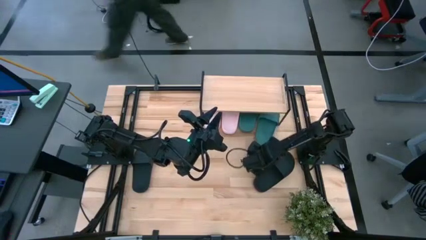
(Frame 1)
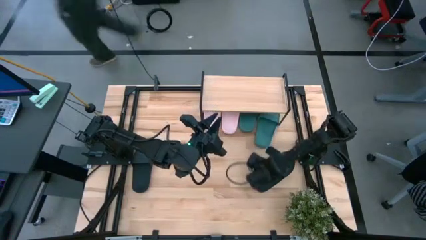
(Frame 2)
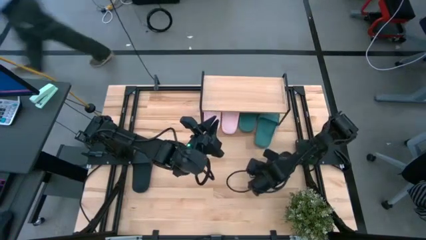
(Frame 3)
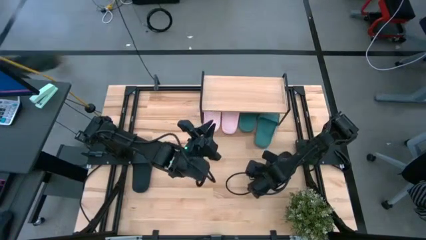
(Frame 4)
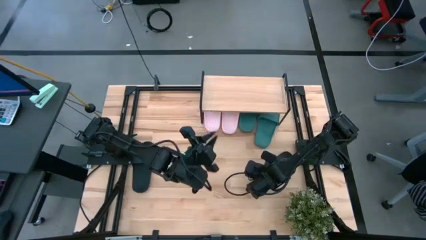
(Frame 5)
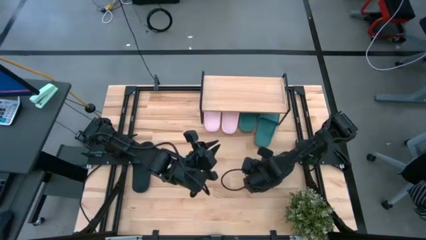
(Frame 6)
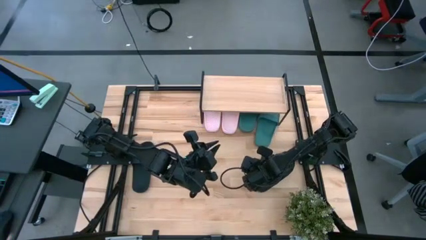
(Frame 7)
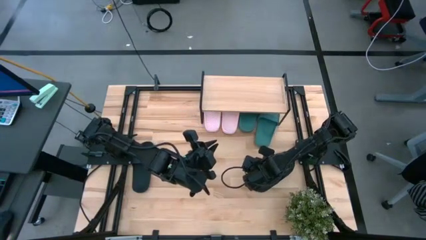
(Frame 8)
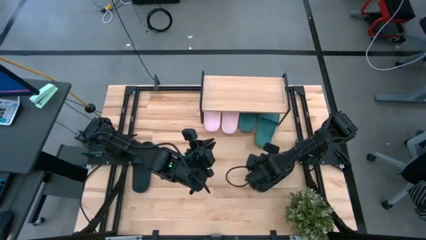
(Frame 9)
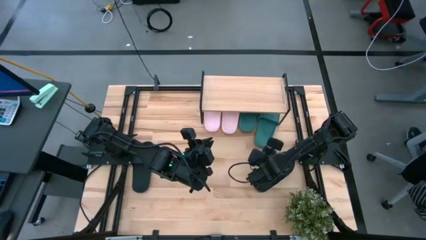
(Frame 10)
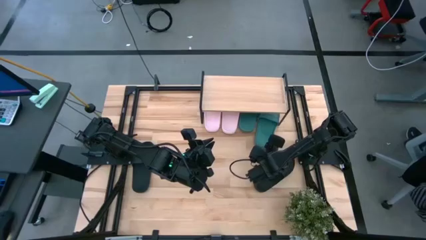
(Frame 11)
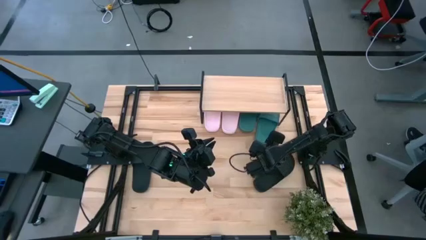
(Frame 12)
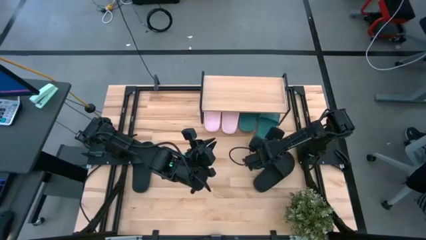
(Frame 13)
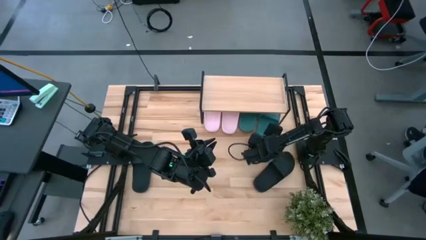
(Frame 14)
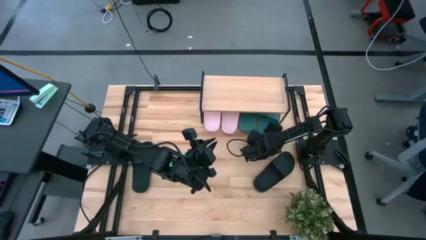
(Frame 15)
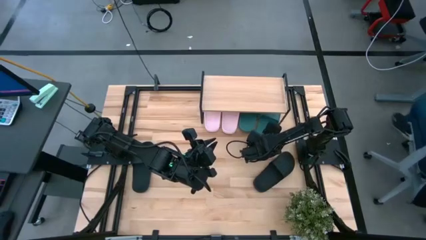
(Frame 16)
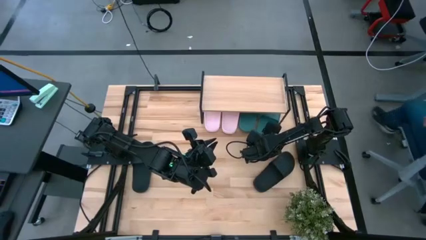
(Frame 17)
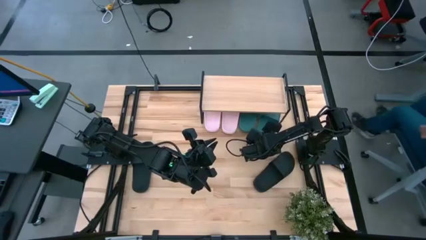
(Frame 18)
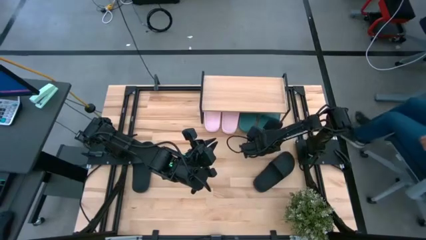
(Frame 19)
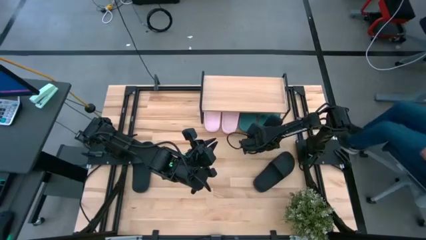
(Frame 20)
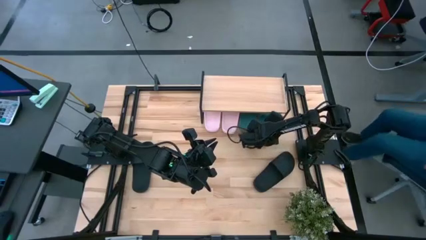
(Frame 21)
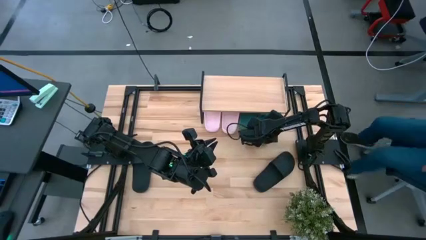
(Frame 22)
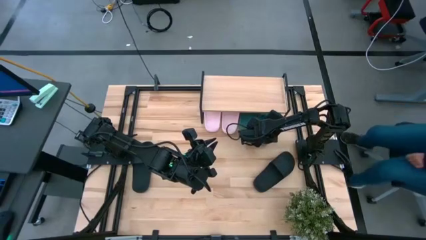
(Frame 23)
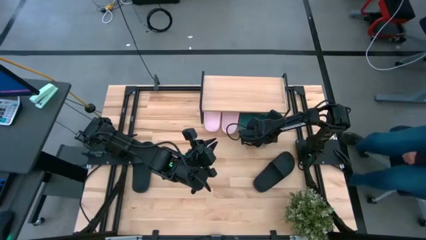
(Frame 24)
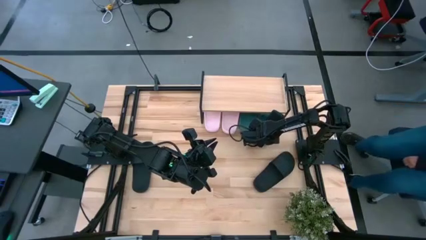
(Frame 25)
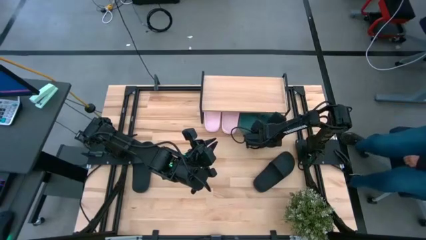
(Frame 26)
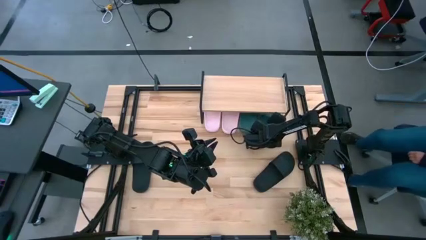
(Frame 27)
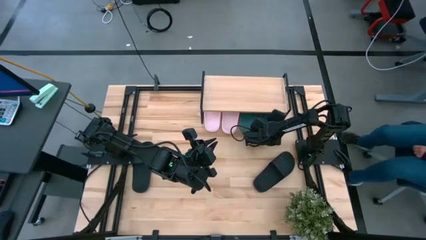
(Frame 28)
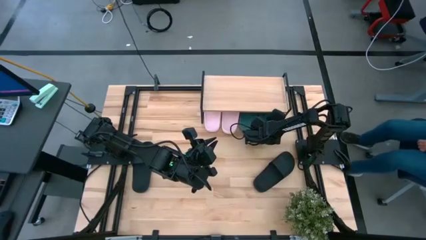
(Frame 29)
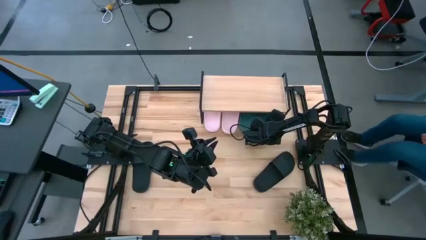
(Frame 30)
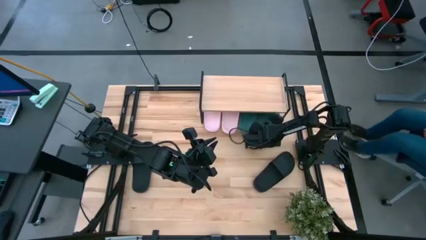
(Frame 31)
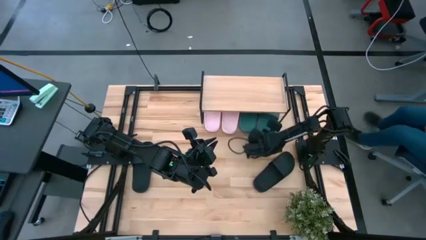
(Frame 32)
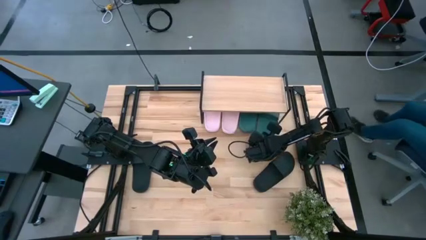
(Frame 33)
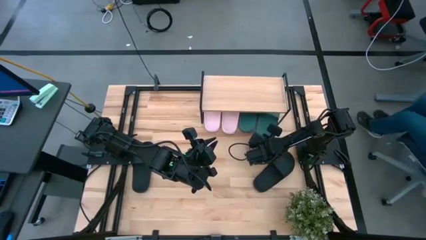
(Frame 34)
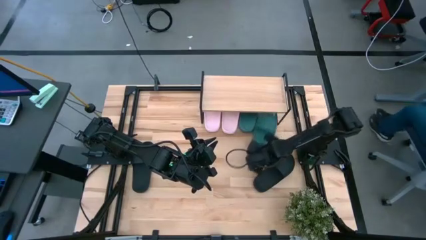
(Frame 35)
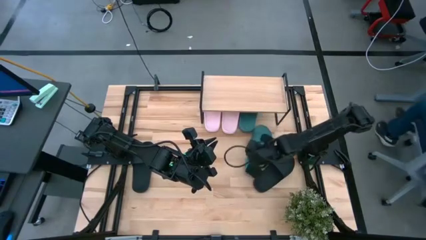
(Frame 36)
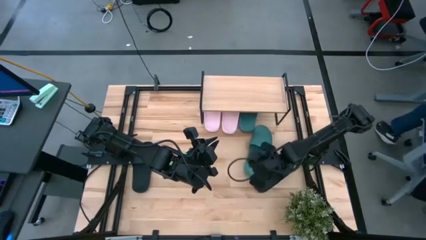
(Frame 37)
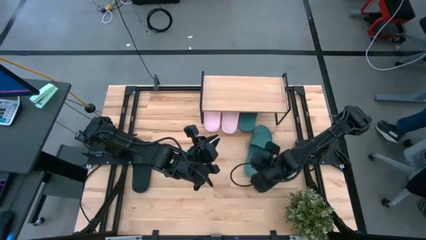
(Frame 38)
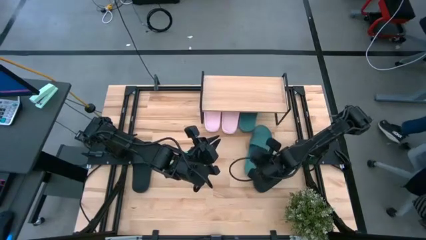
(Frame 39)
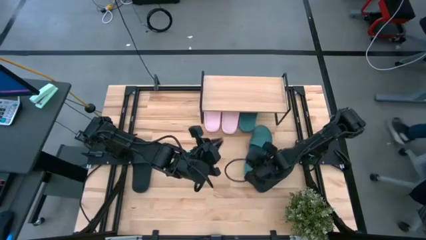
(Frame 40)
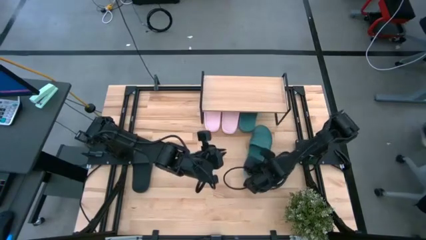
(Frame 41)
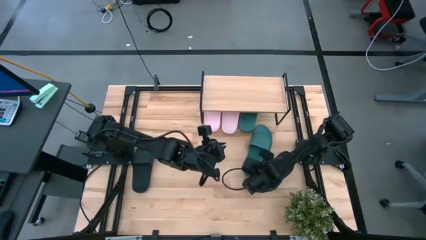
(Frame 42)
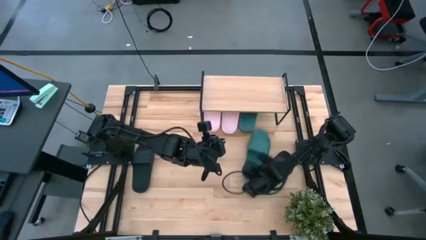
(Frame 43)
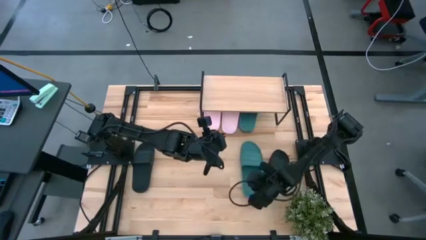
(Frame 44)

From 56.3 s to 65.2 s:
Task: Pick and place slides into the shelf
Remove the dark green slide from under the shelf

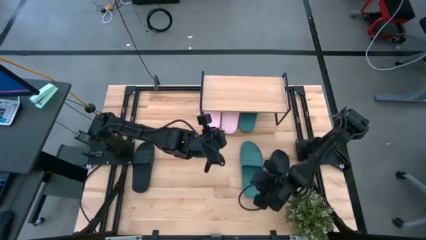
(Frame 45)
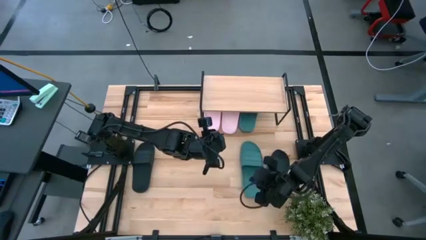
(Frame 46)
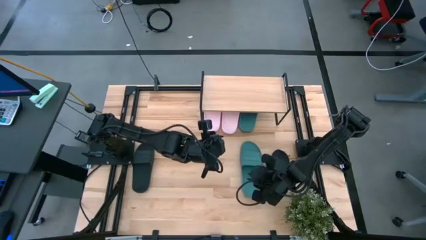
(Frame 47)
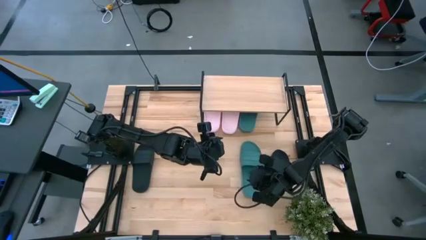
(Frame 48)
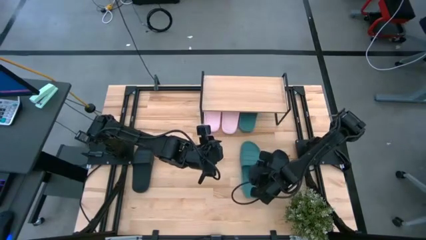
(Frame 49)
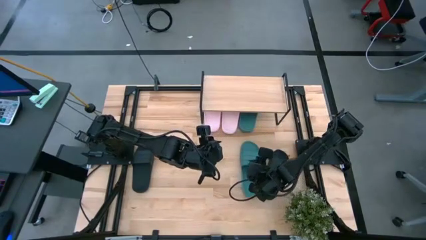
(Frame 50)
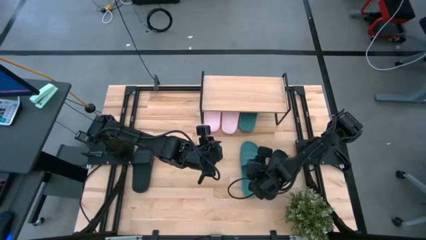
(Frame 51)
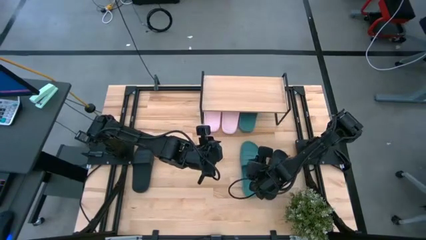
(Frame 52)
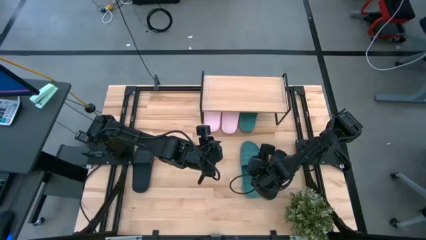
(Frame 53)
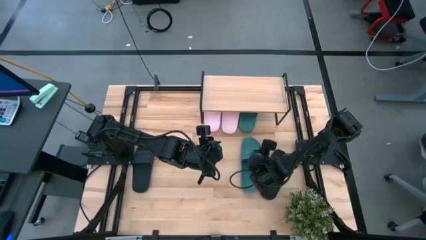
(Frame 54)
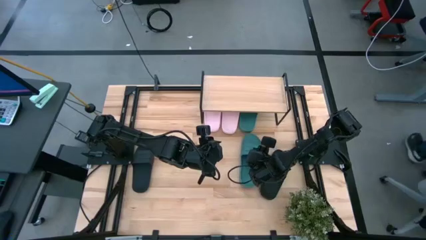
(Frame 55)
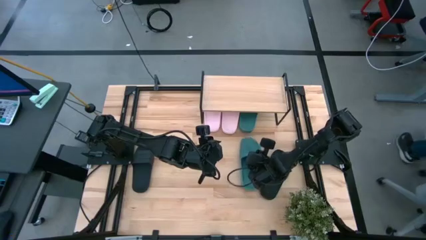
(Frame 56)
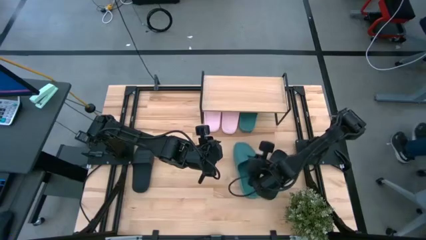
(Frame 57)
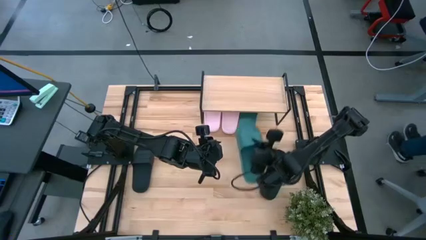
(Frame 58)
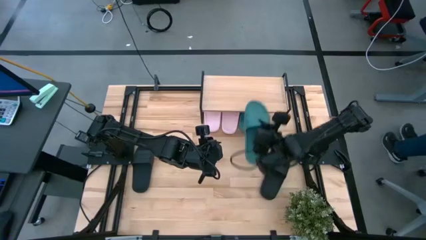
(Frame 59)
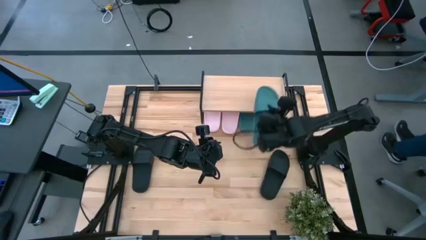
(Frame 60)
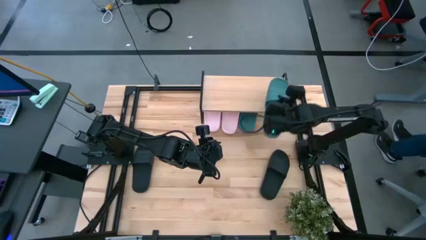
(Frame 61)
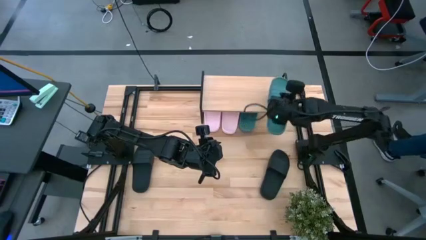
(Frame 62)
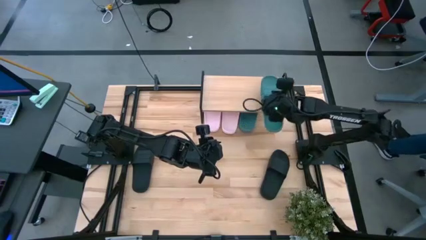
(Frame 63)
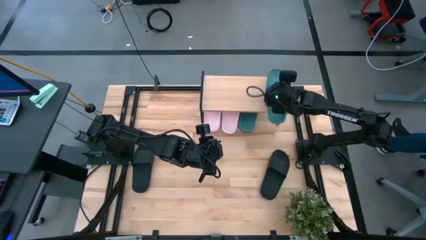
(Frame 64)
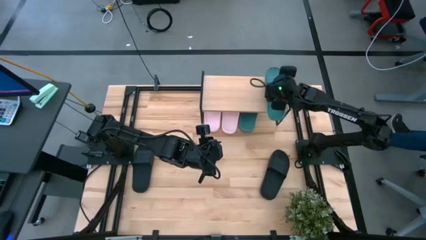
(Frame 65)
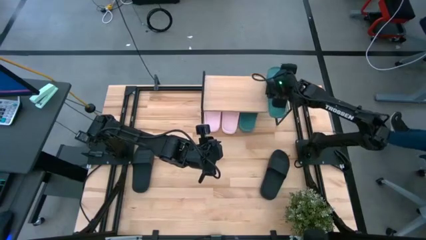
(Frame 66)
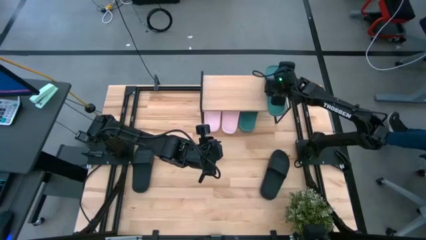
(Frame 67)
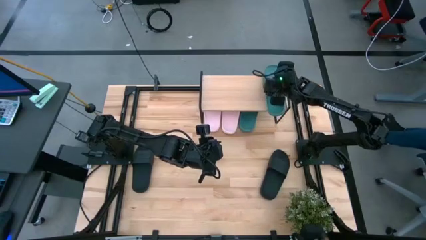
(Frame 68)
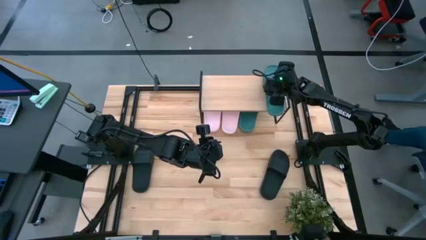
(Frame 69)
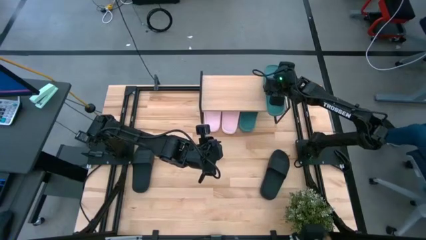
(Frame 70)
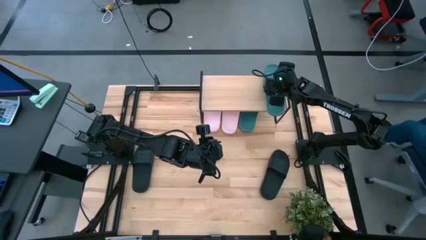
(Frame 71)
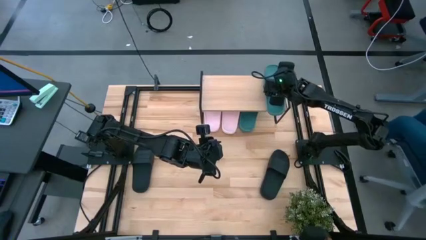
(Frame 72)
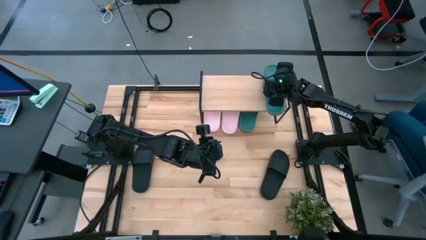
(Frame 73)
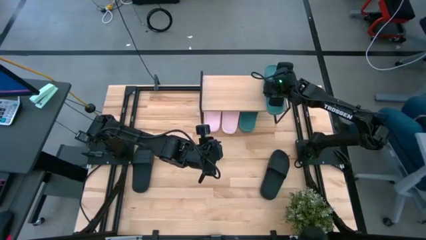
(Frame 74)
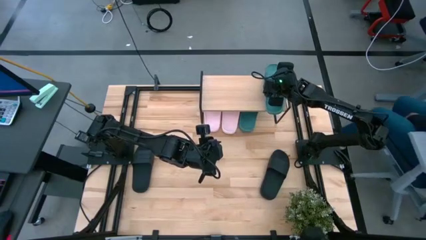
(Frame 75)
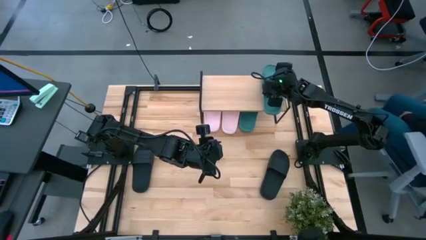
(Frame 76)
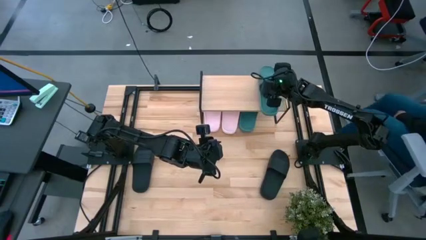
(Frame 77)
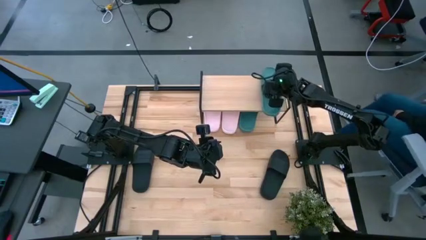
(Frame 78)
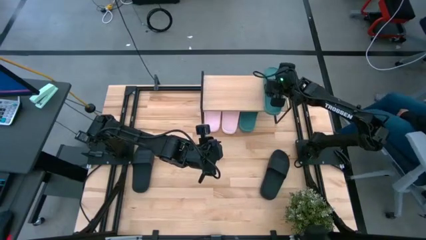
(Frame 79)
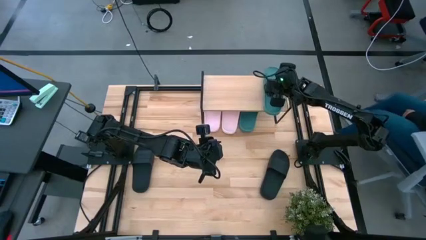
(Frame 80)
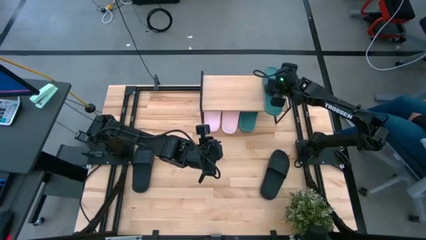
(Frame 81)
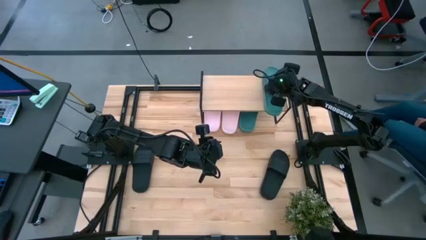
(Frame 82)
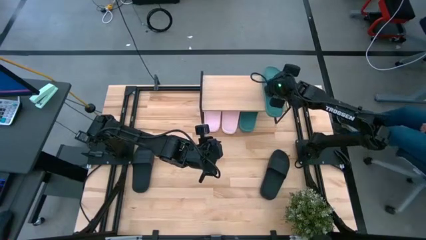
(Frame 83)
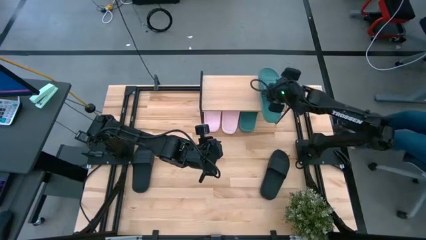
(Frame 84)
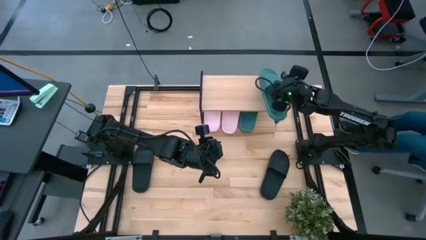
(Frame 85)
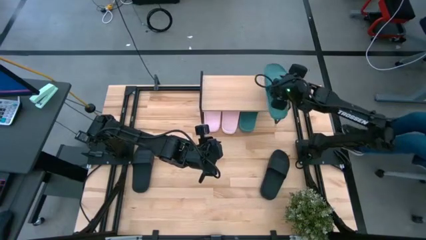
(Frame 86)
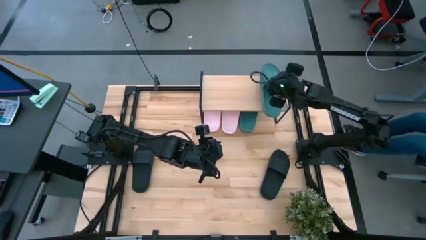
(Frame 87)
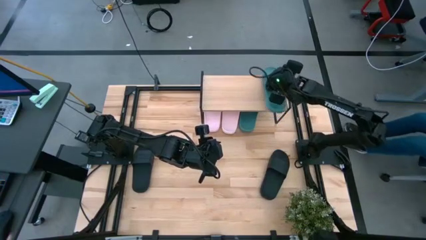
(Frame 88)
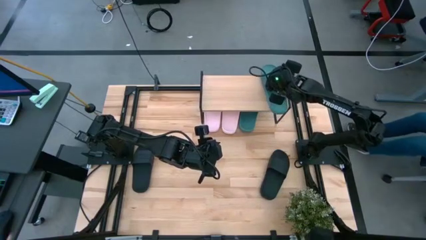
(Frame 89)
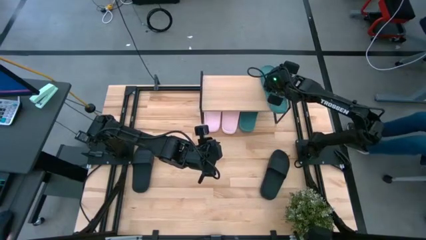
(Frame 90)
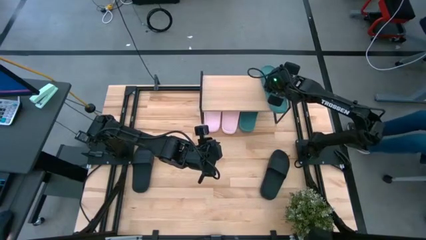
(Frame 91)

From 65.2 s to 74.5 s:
Put the dark green slide on the shelf
